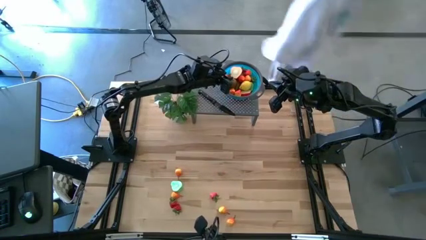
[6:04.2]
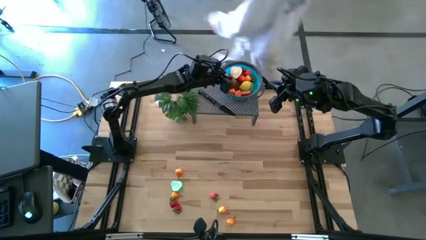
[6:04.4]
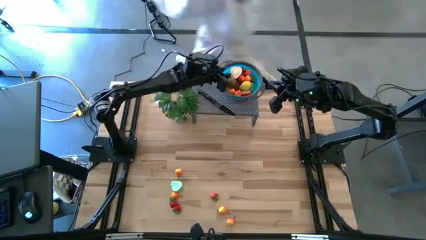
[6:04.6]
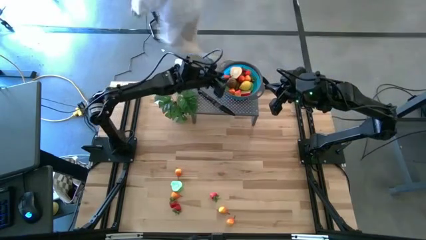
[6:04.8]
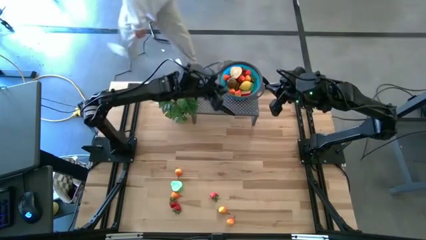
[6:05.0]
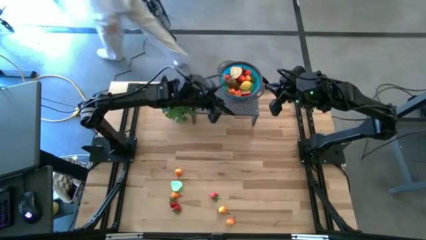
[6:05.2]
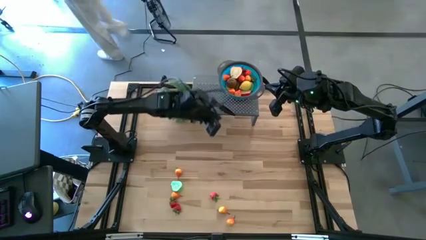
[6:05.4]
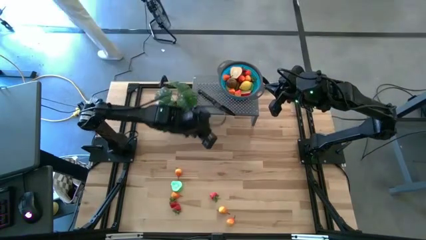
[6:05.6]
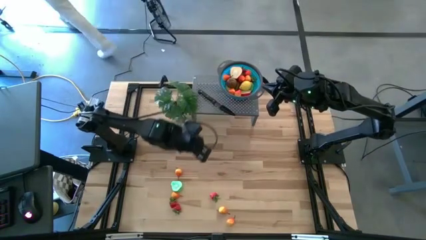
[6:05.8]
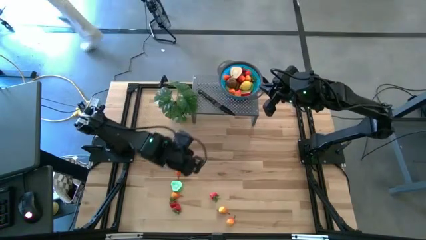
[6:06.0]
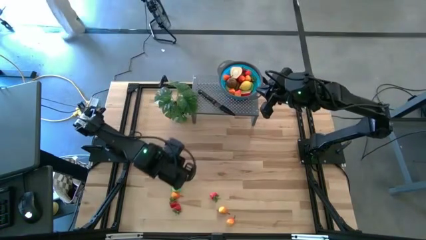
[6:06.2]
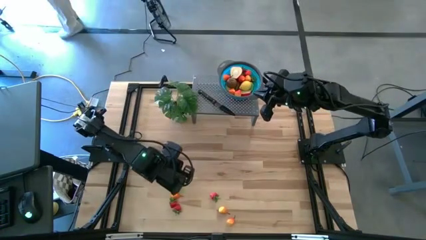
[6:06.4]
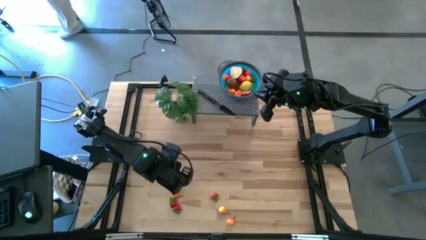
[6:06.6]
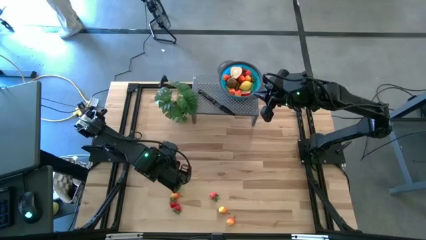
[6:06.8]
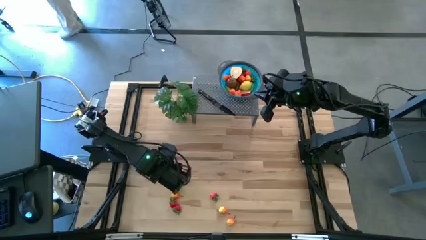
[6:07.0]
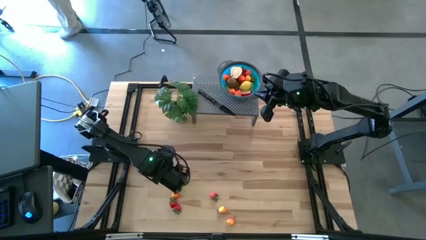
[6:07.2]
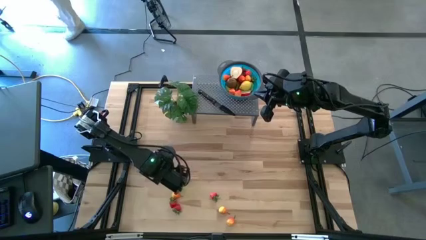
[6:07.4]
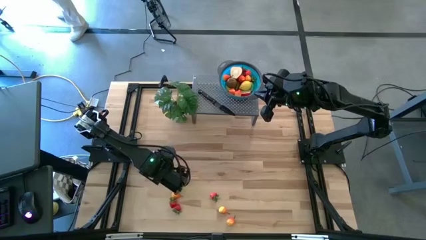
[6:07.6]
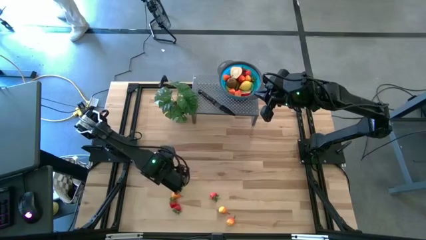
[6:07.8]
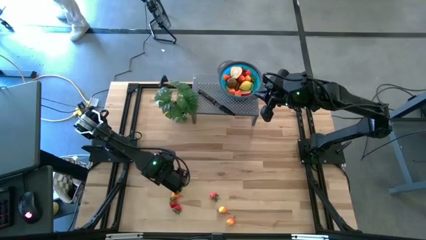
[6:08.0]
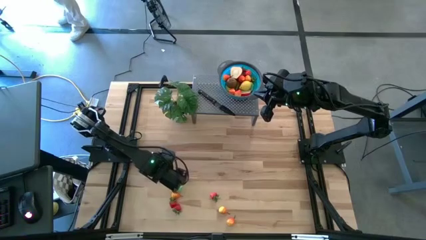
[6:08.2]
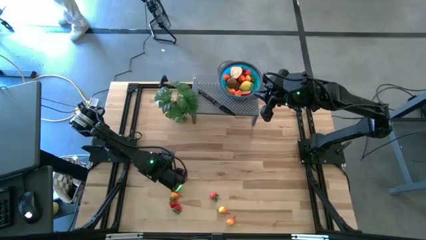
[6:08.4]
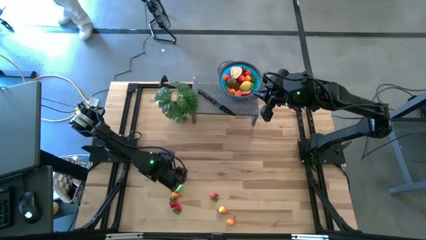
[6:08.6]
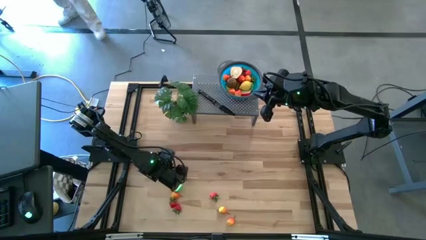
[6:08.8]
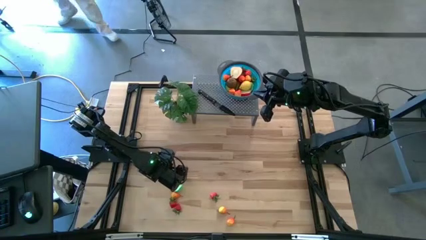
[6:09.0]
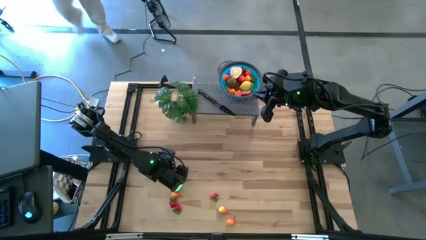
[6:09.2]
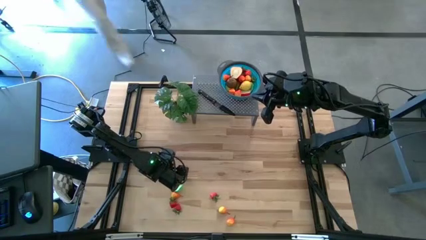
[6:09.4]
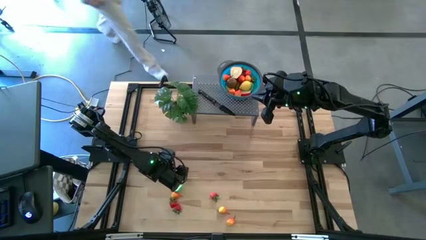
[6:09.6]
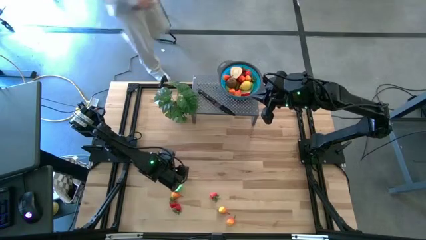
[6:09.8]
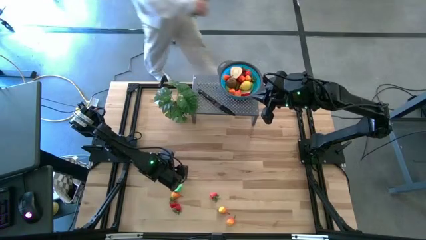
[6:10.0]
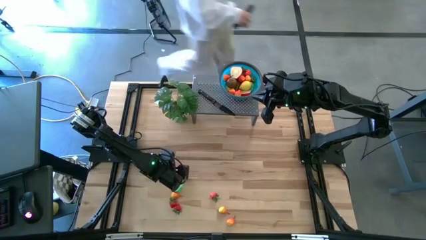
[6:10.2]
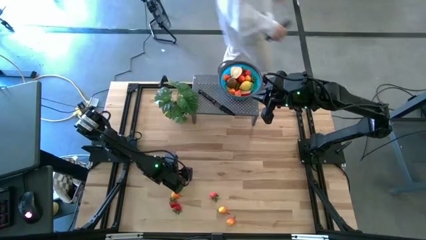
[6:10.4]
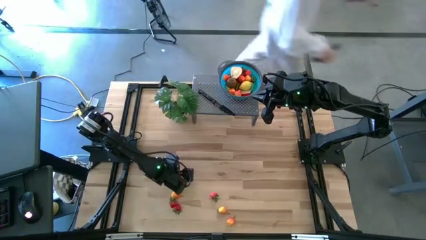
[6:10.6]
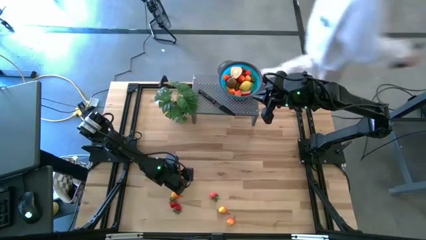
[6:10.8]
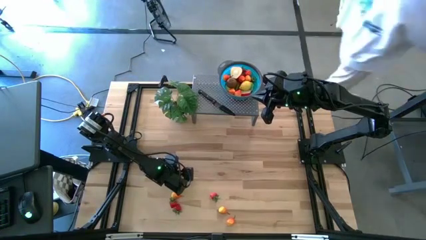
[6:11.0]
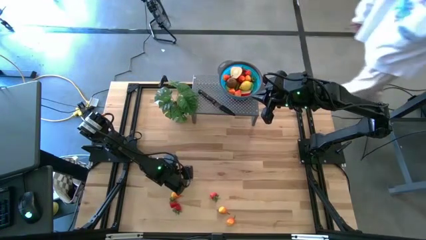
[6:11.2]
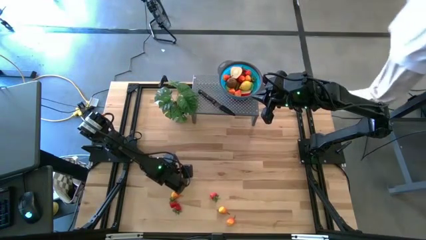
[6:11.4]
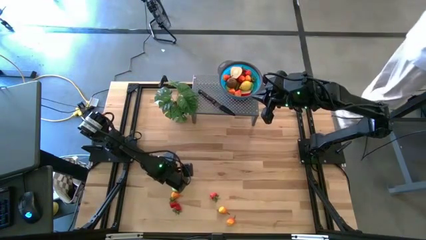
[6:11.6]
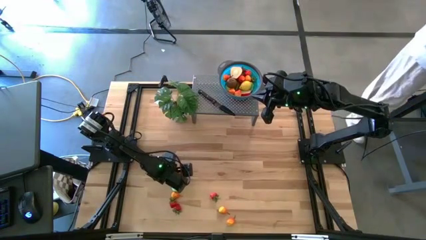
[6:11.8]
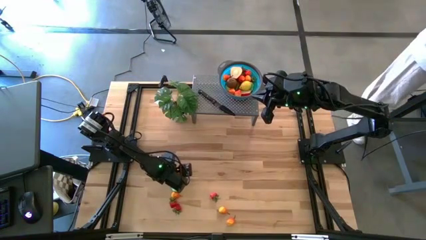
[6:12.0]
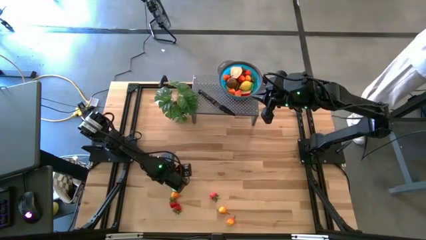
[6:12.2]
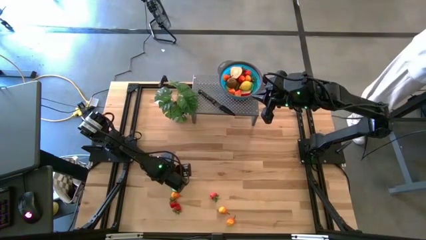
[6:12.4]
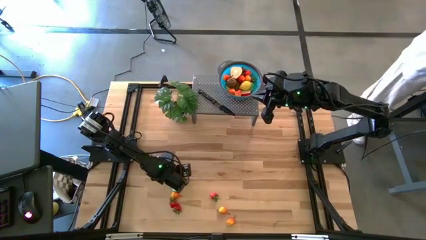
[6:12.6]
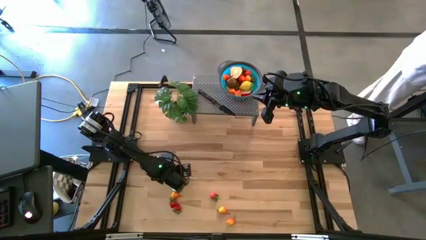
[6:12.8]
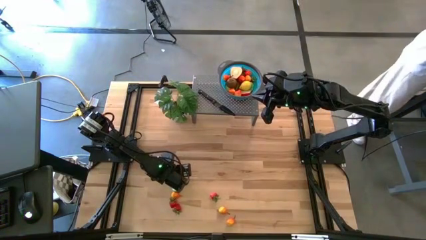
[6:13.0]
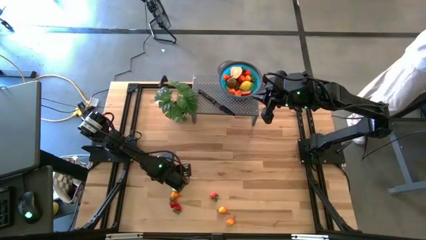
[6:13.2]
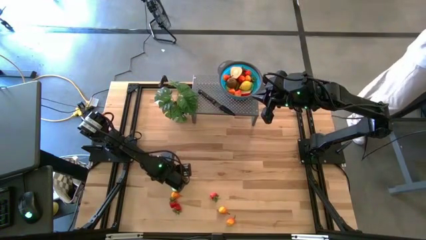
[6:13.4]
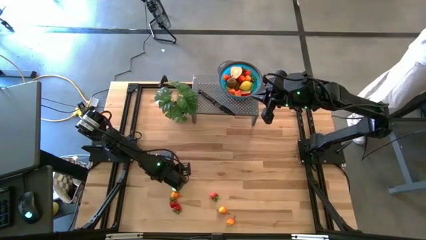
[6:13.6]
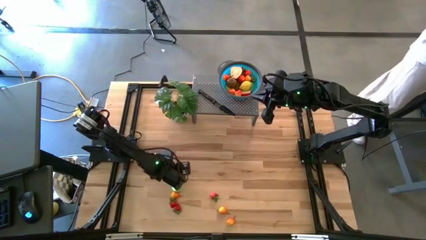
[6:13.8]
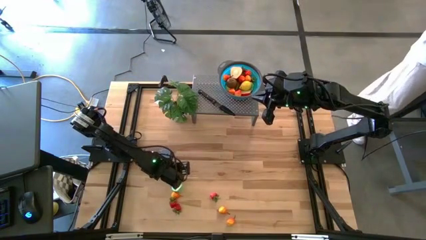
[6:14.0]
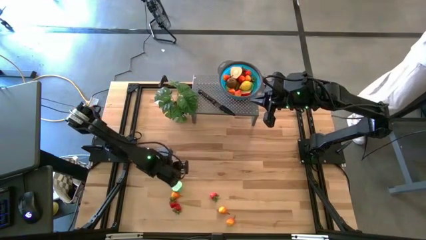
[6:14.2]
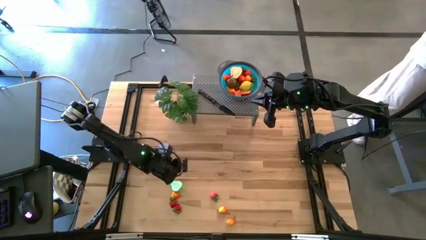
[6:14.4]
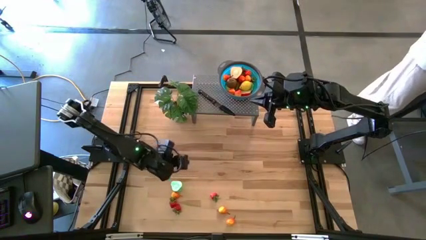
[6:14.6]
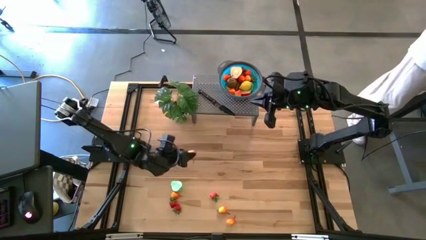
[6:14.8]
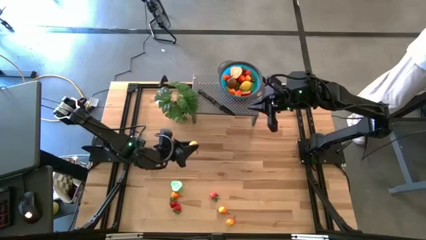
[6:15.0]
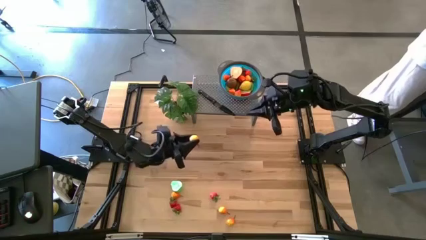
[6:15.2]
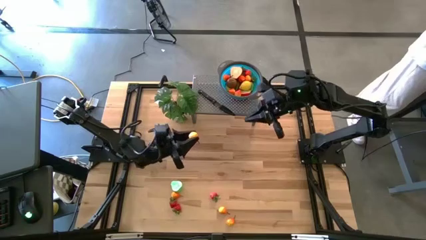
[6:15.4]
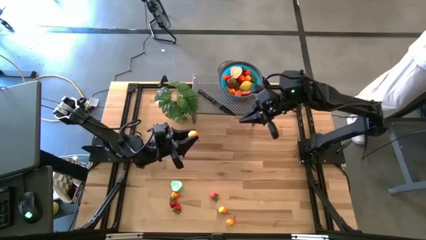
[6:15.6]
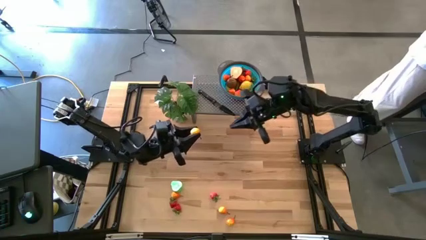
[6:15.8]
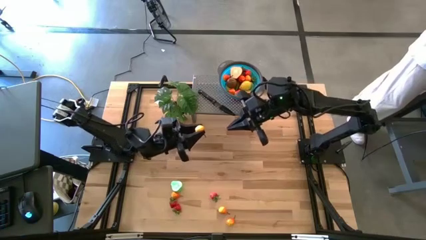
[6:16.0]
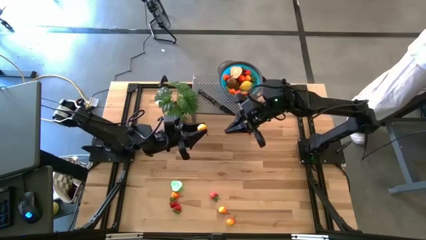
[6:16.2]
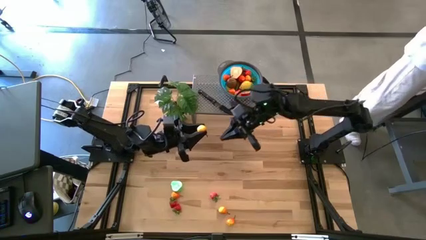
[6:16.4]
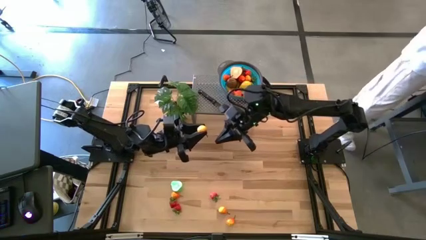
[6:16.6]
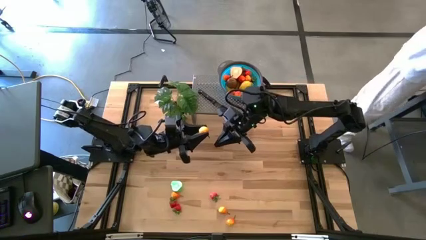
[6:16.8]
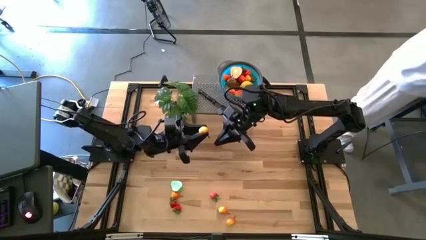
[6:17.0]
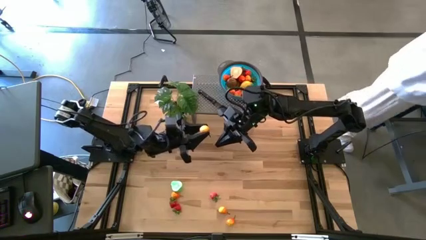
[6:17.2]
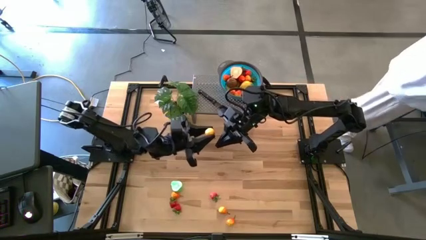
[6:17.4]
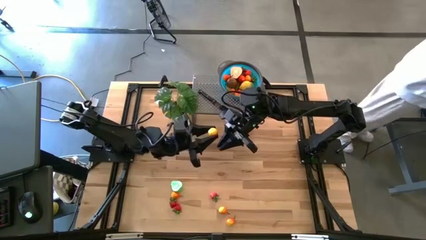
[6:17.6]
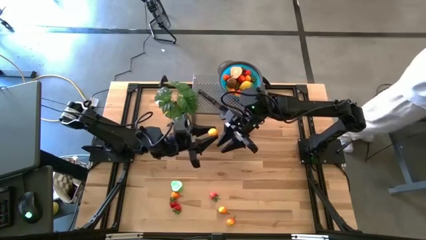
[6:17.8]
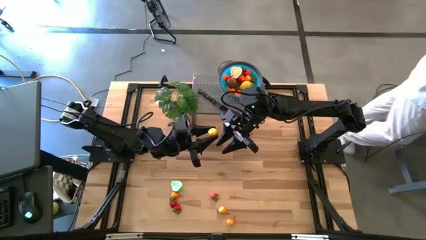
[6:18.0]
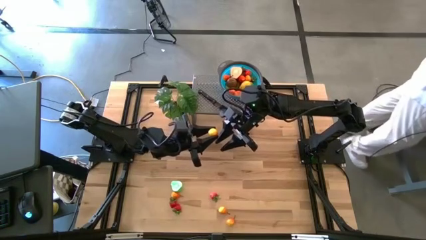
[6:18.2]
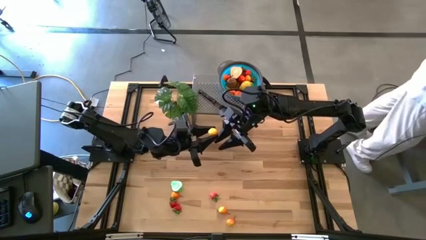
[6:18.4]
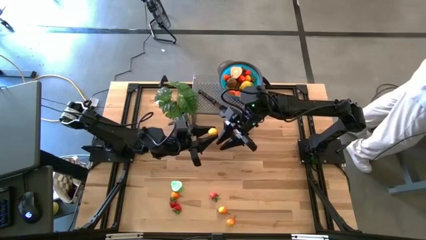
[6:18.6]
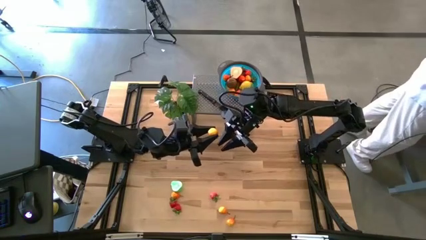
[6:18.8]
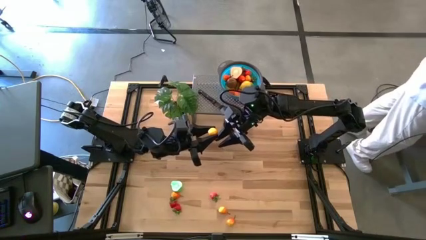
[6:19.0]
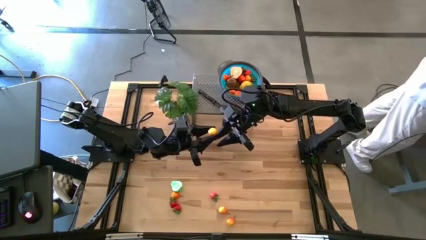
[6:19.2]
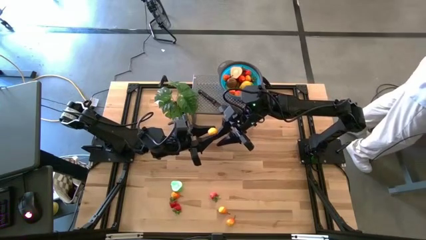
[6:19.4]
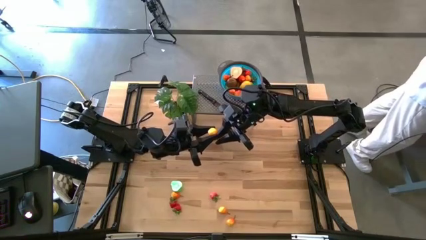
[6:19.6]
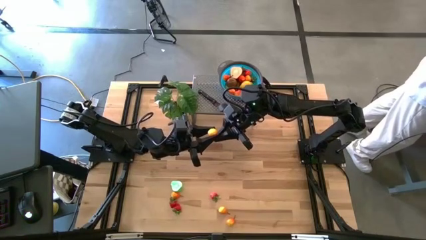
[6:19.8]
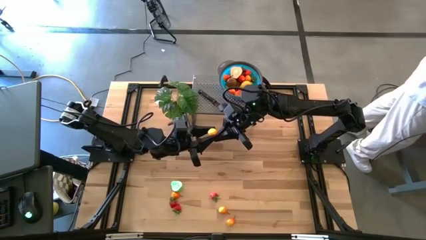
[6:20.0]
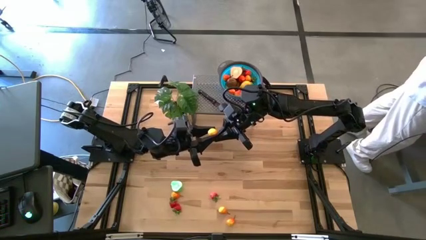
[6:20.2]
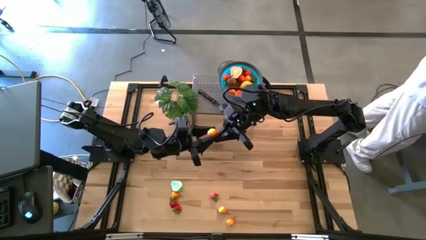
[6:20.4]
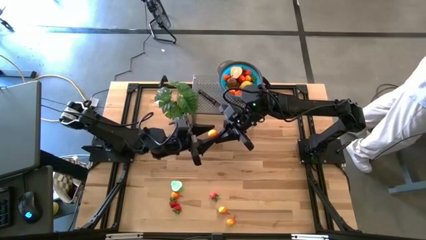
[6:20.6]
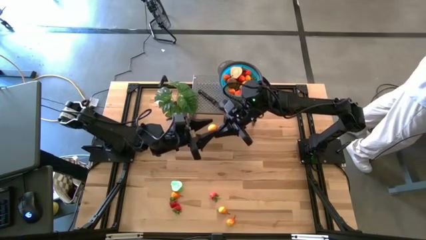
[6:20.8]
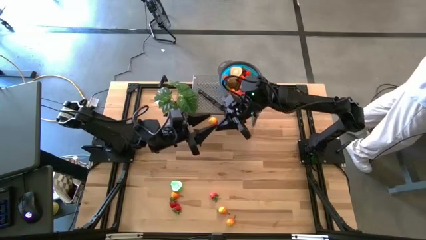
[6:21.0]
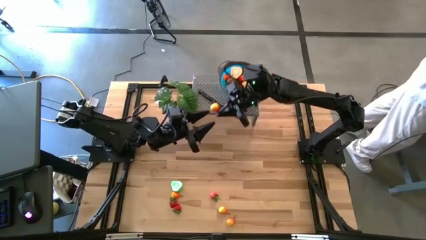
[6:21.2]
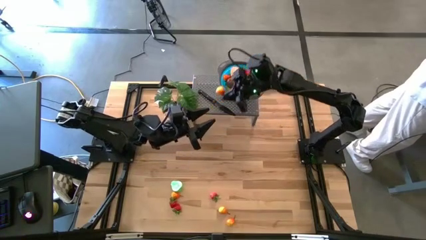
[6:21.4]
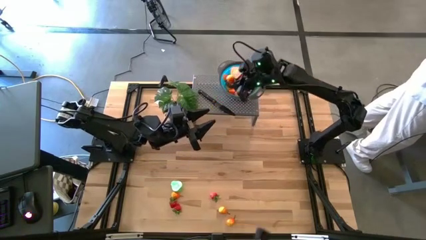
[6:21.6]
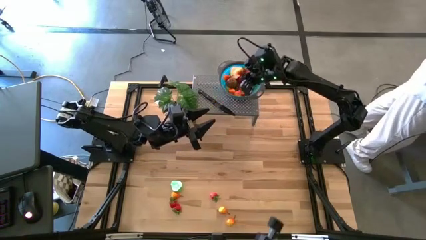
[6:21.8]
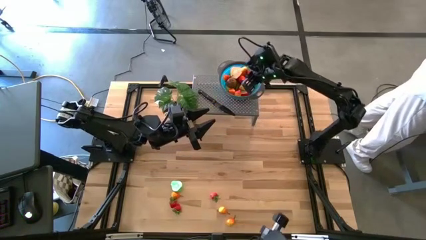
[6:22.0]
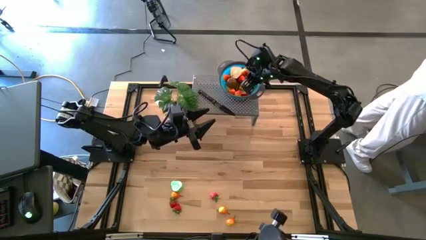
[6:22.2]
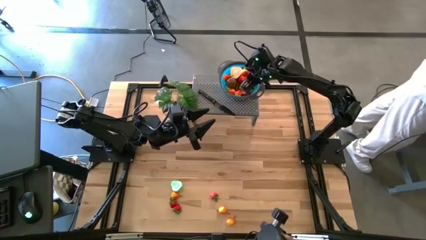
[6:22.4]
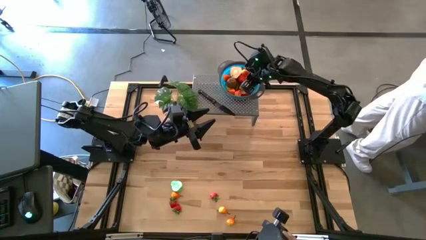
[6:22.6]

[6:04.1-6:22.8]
Task: Pick & Place Fruit
Put the yellow pear in the blue bowl on the shelf
